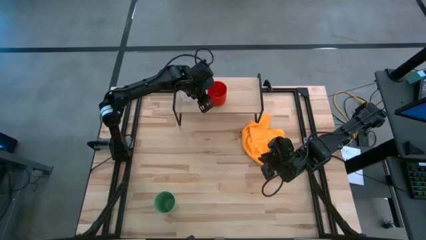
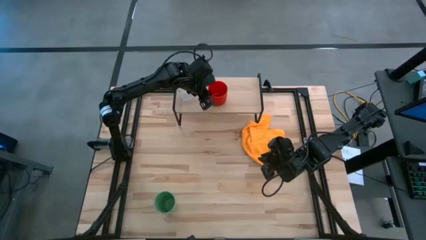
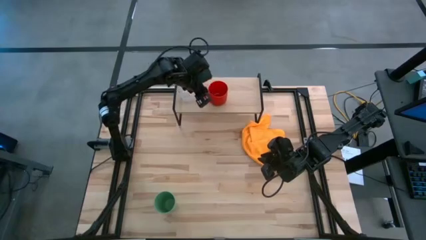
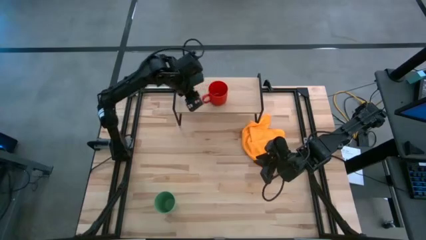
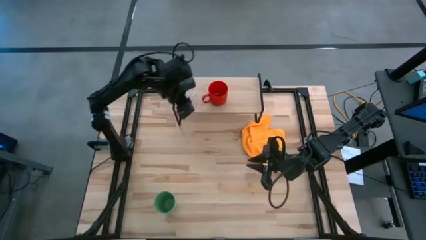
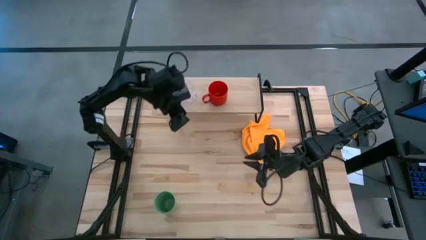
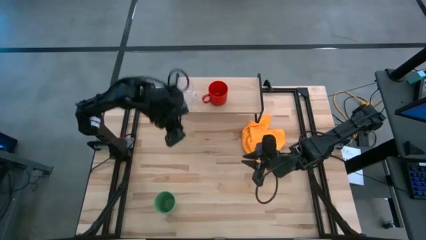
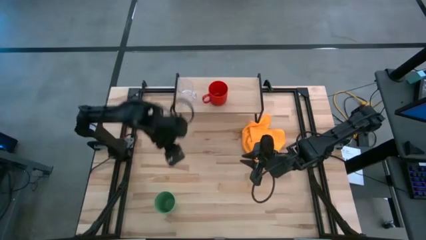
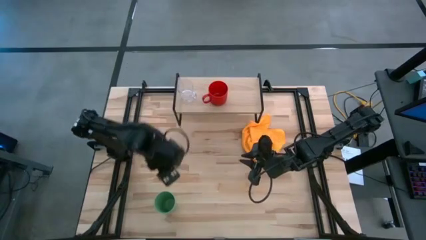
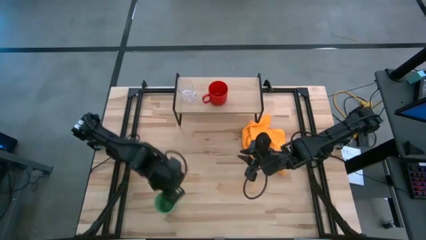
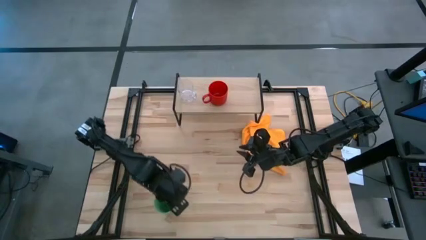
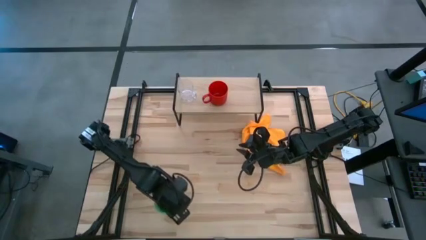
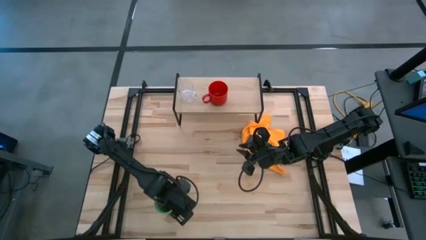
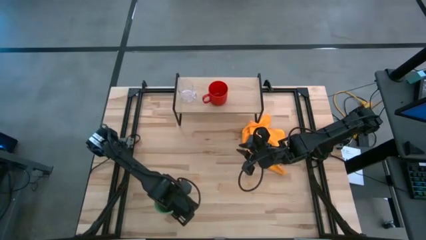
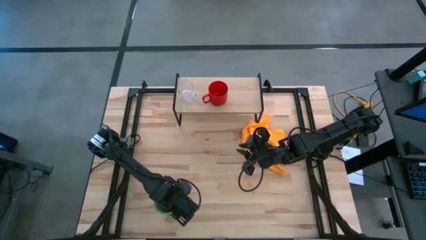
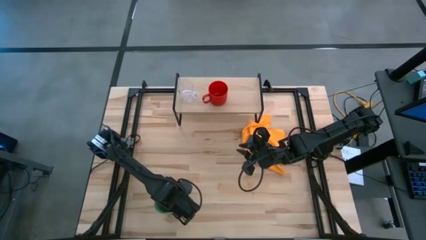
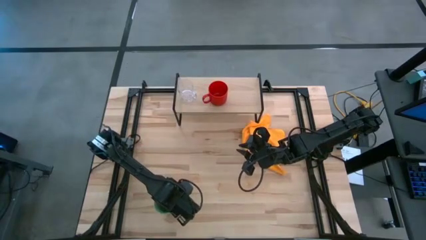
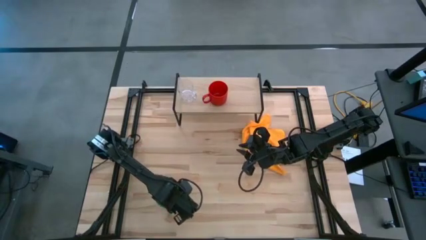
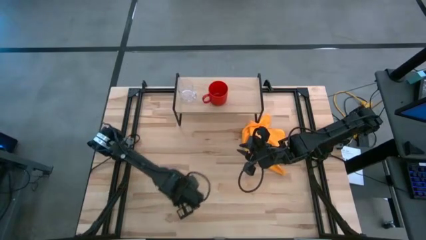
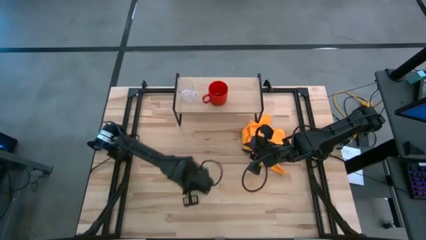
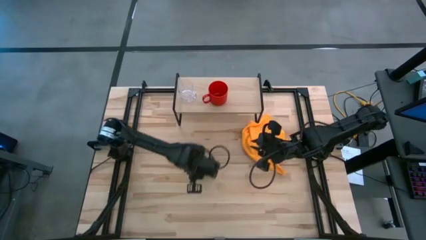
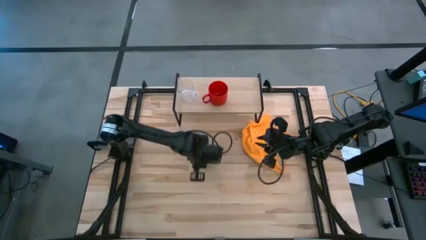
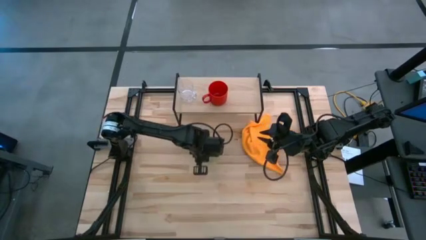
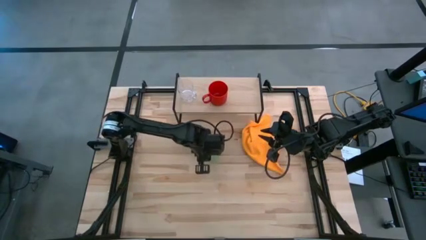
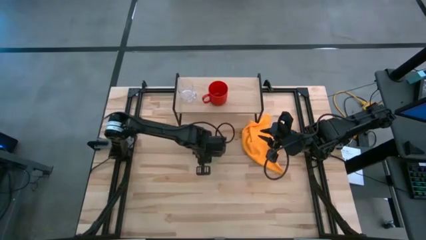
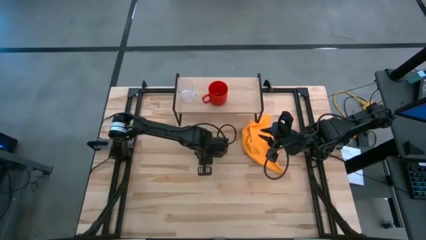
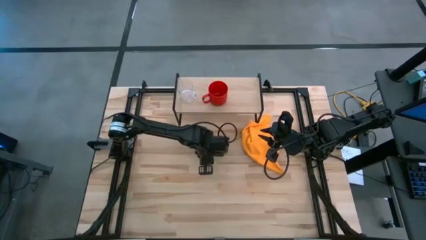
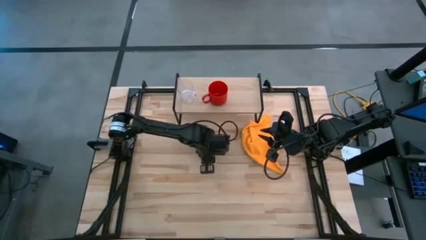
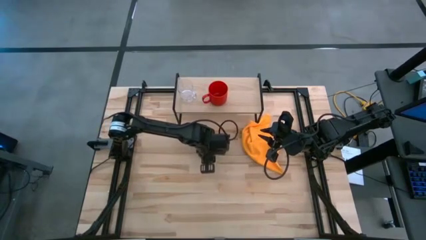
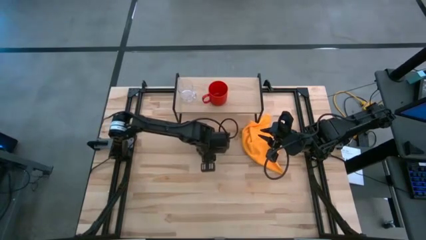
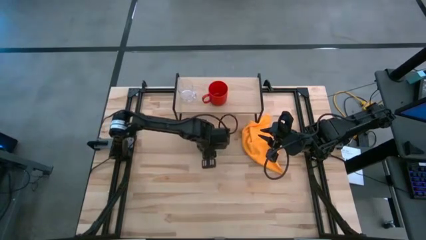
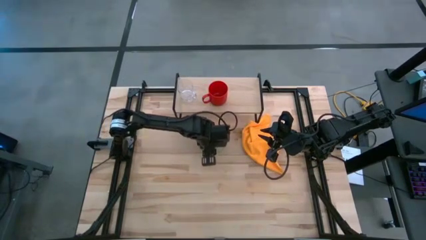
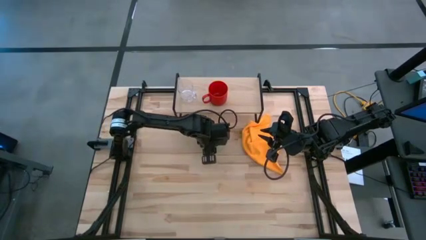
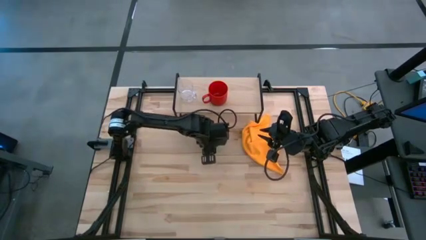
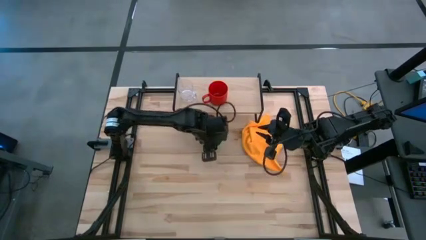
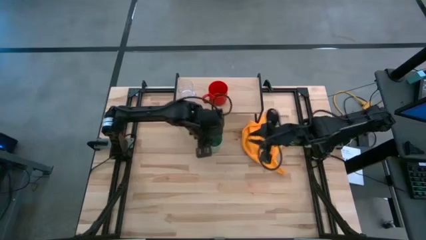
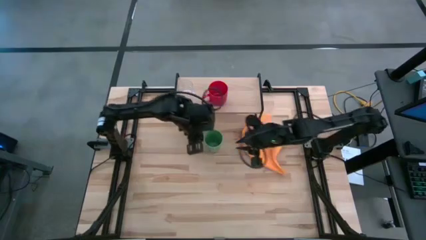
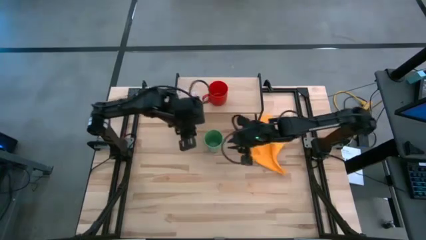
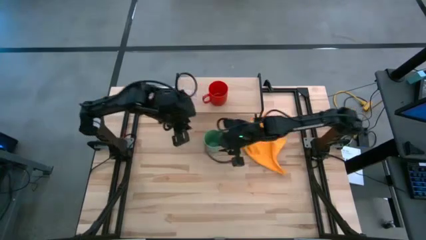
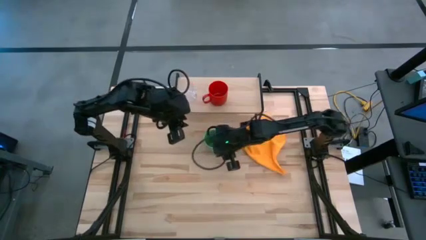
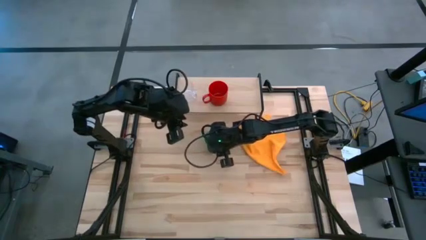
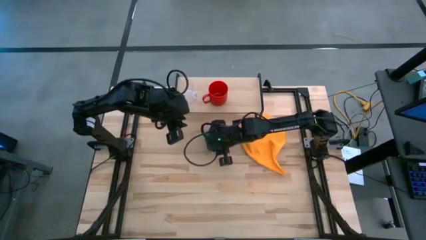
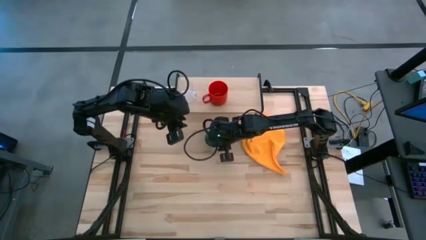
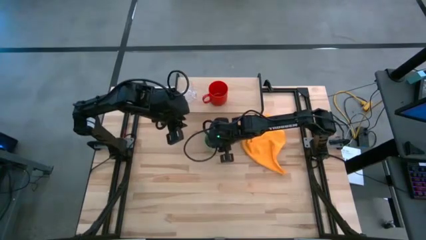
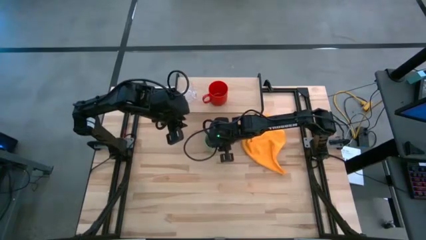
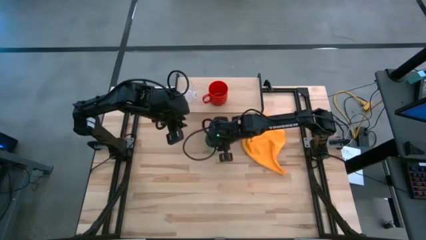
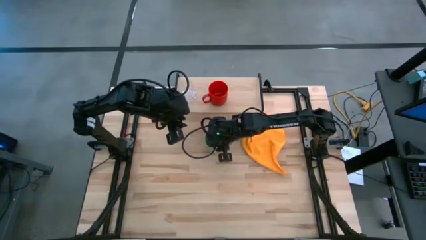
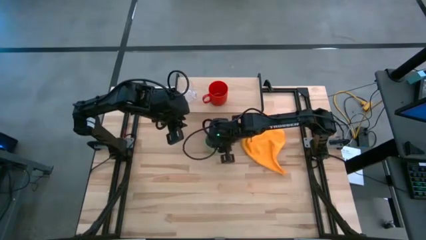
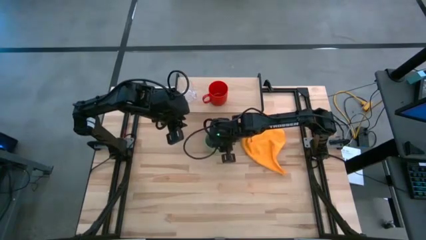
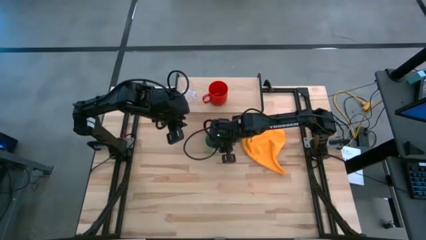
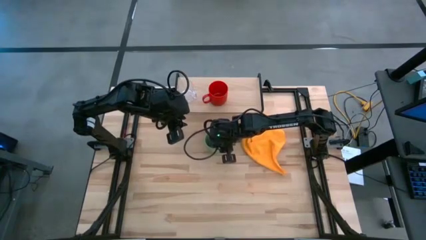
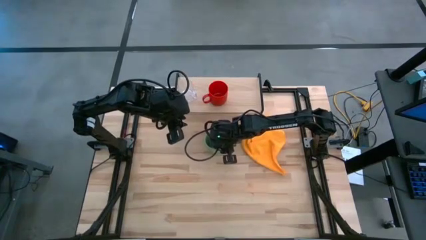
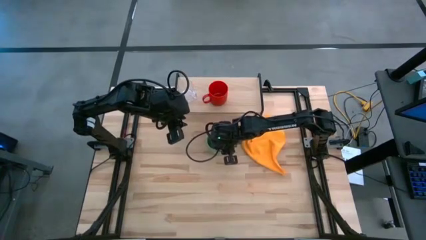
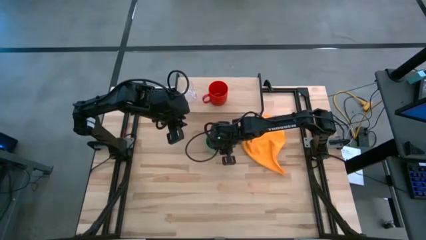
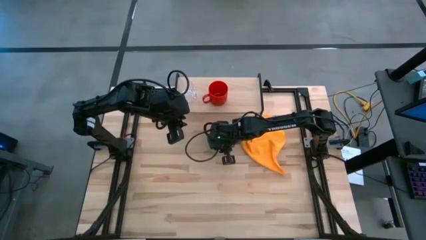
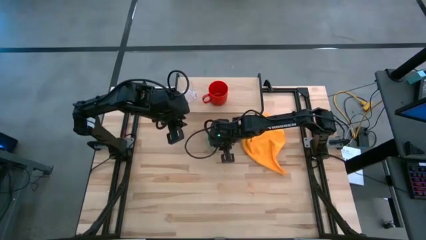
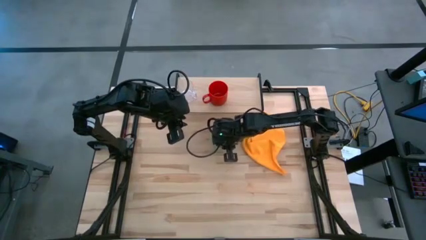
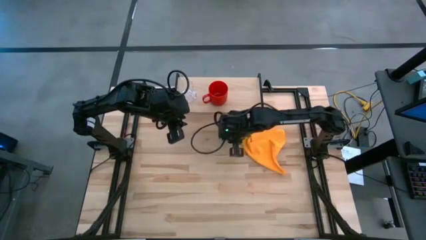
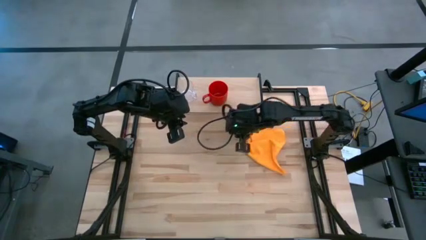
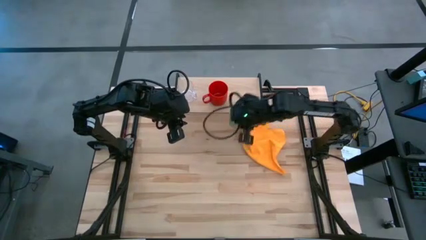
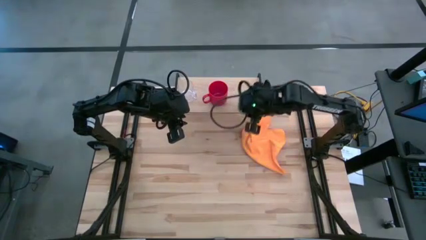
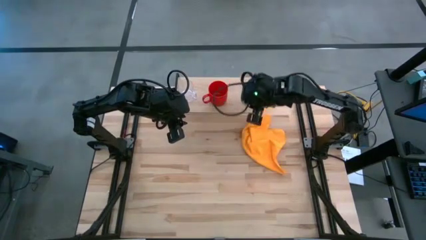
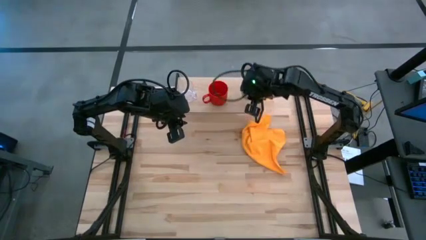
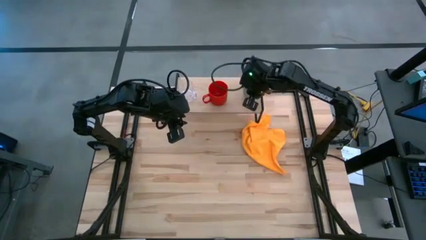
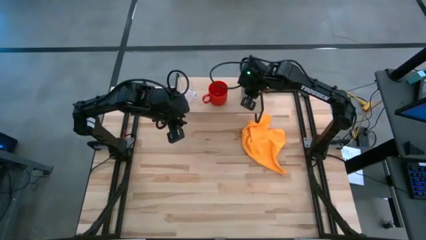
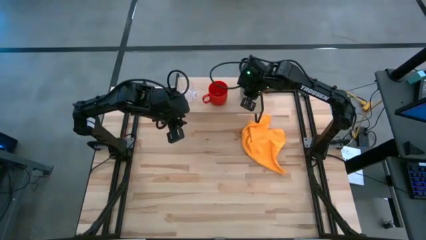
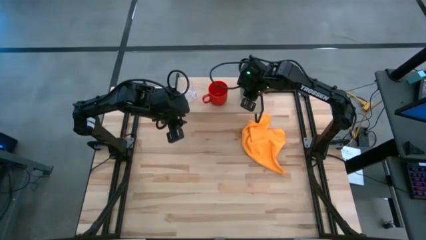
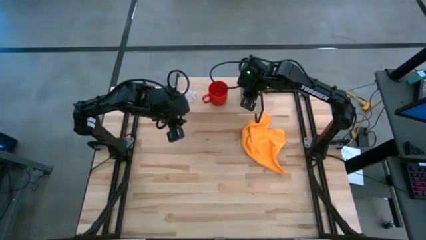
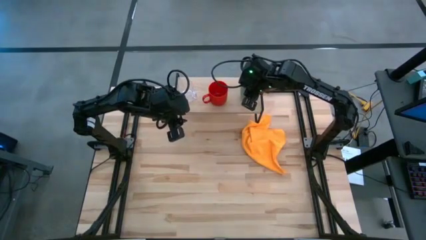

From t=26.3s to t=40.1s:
Task: Stack small to large cups/mugs on shelf
Put the green cup on the shelf
